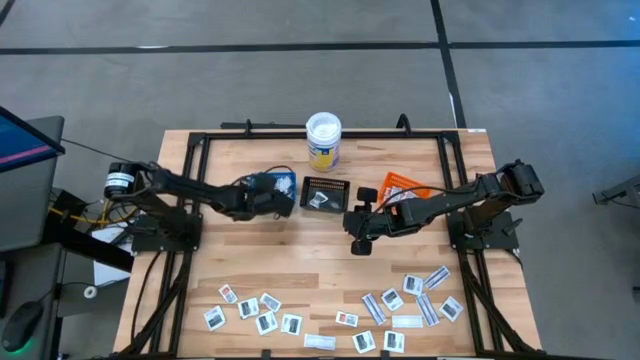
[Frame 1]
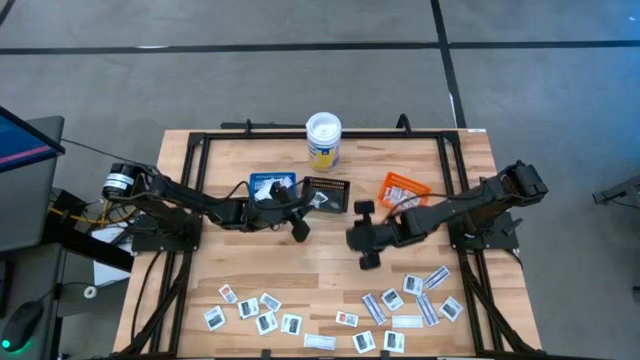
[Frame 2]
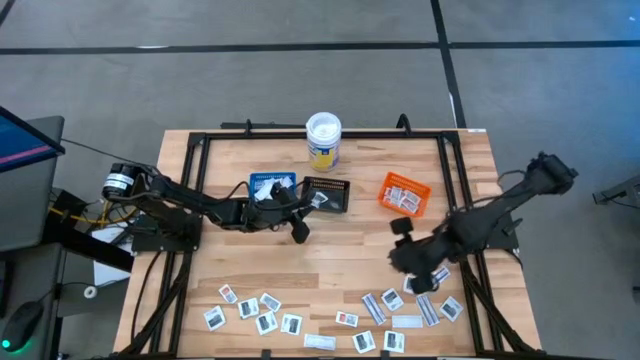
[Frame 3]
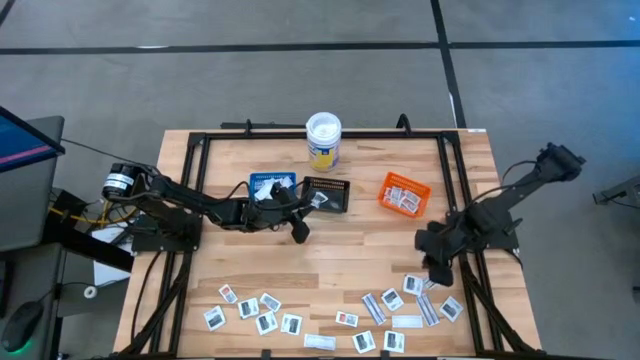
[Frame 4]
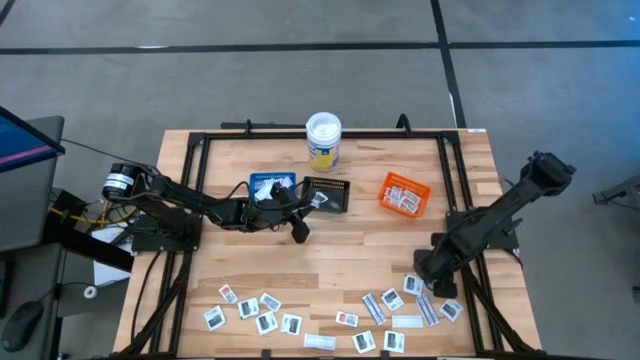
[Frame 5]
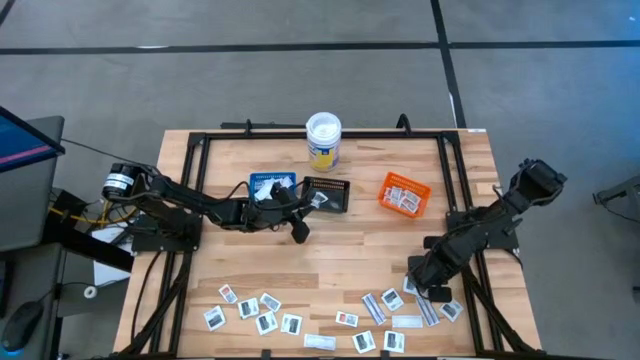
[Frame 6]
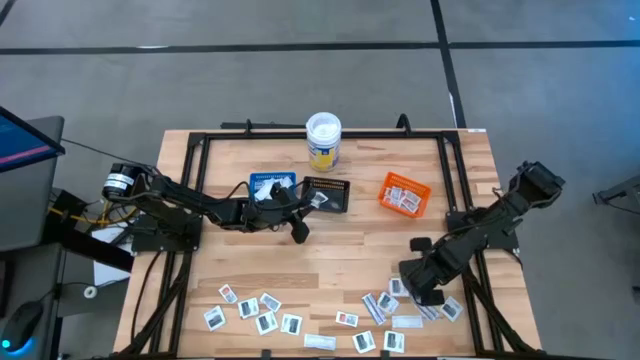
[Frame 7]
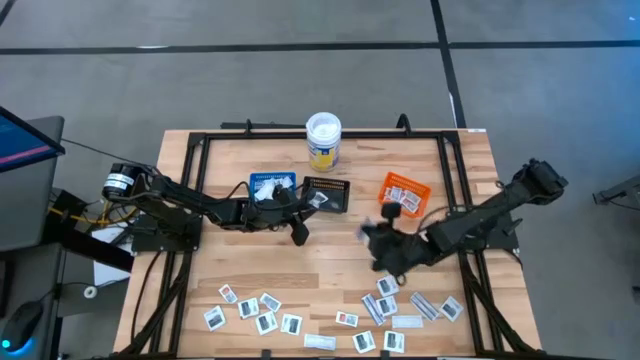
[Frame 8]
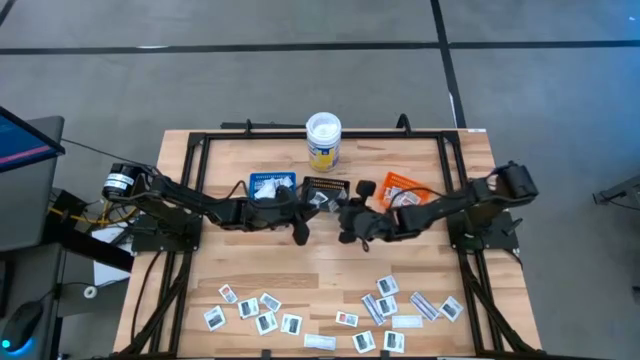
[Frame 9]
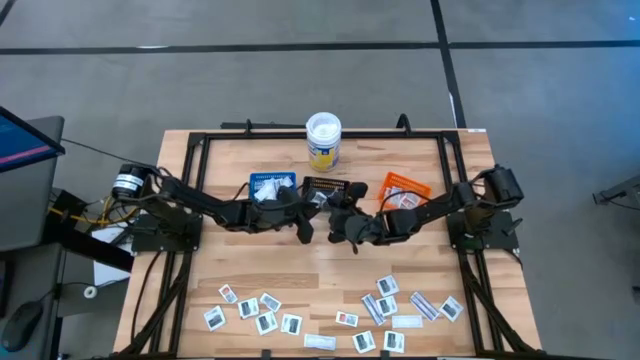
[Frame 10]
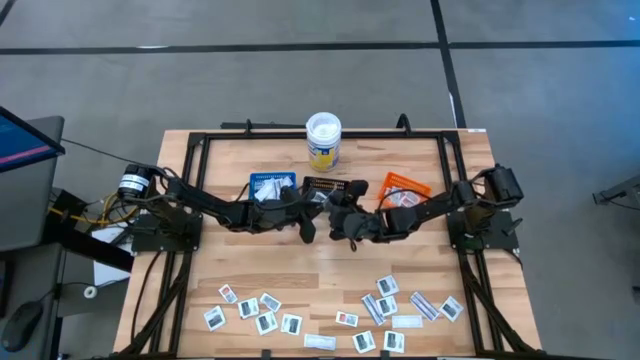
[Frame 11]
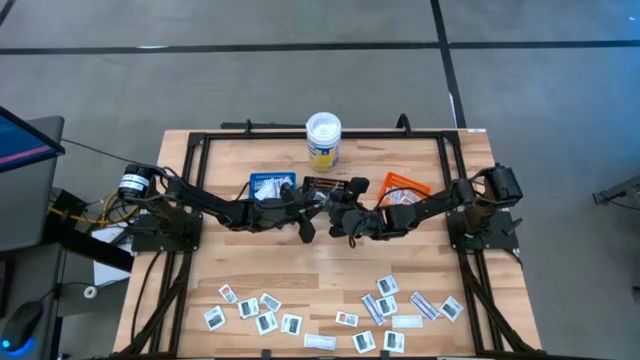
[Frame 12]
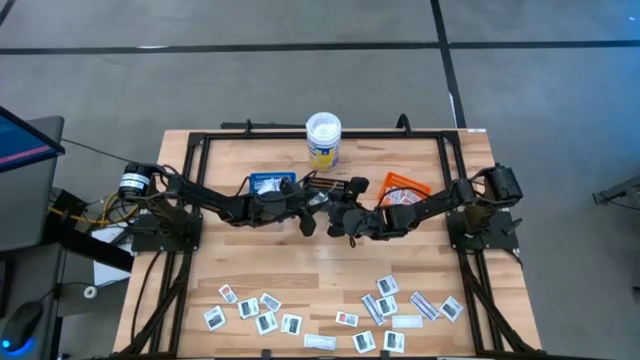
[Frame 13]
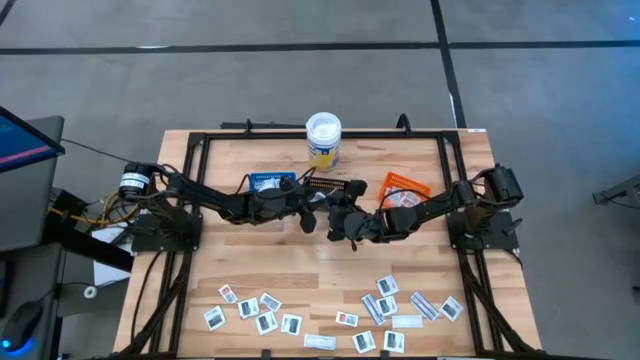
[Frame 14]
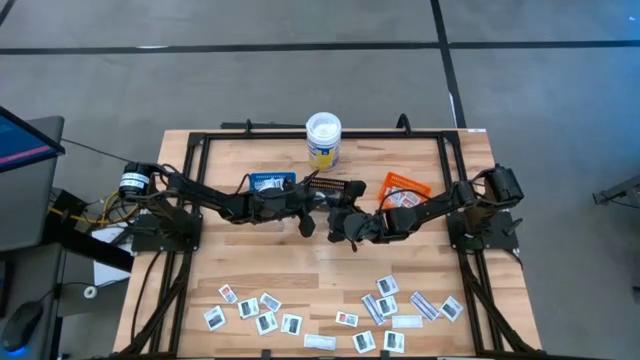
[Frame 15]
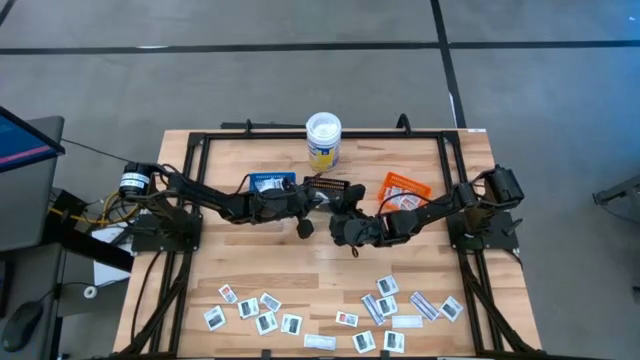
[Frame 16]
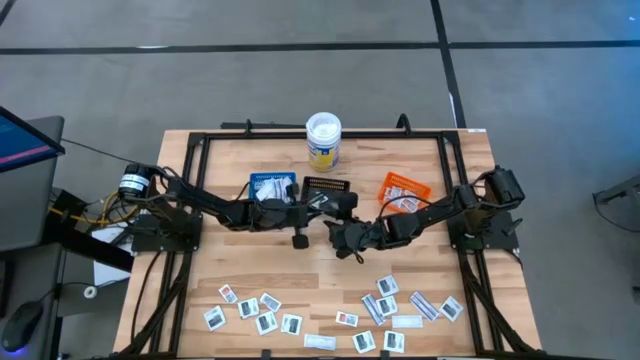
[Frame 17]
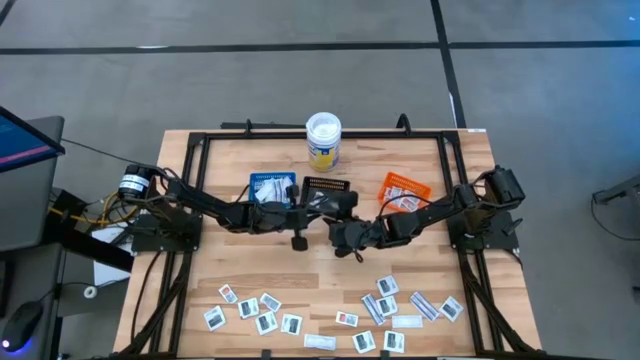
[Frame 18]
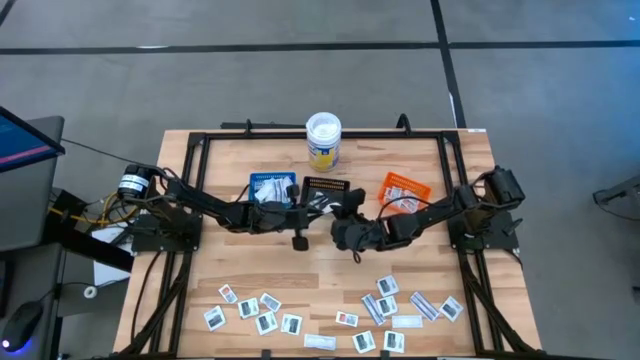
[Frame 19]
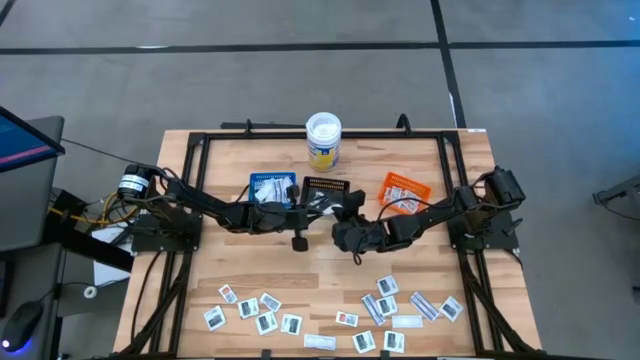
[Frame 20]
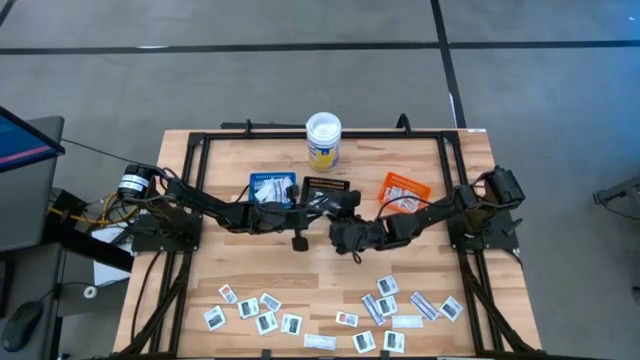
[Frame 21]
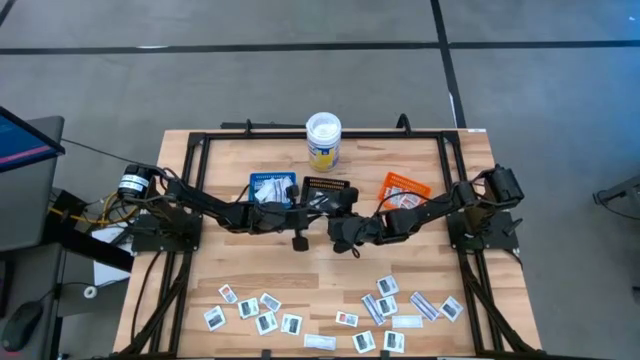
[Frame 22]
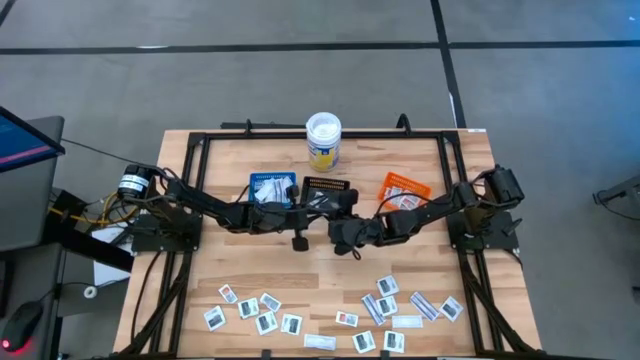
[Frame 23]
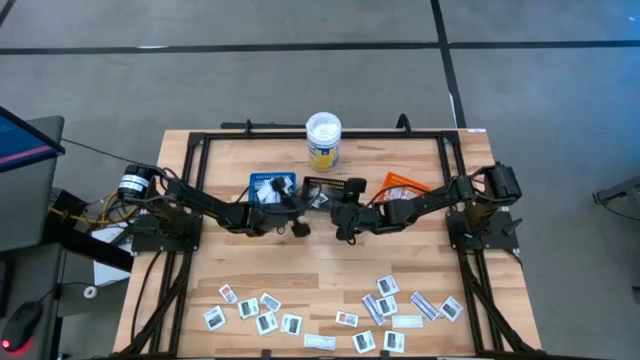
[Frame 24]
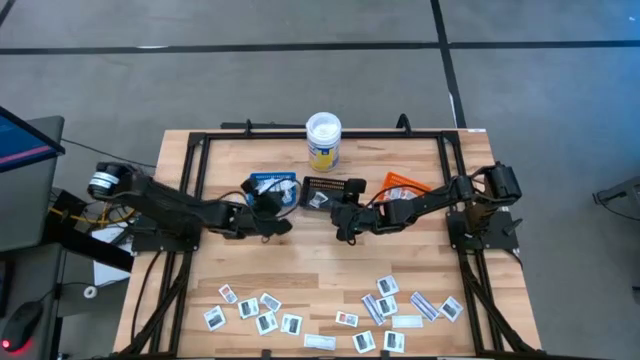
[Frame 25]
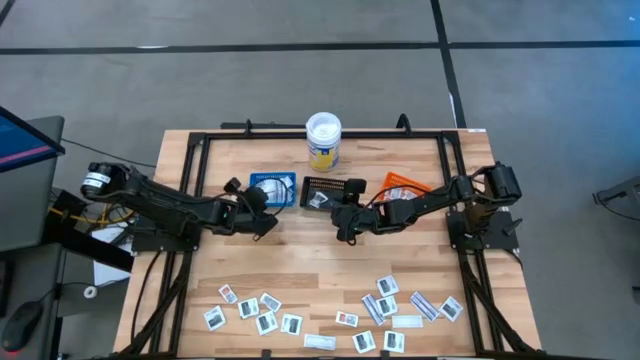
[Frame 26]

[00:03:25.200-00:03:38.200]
Task: Pick & Place First Aid Supplies
Put the blue bandage into the blue bin

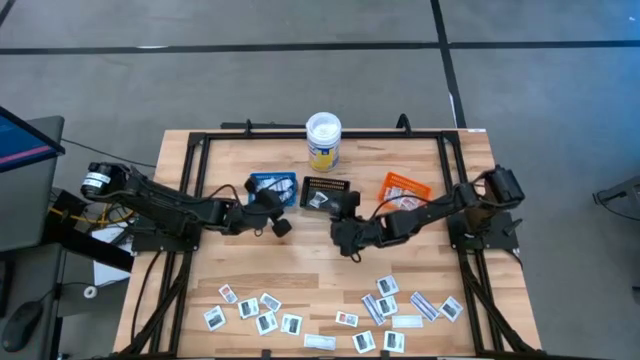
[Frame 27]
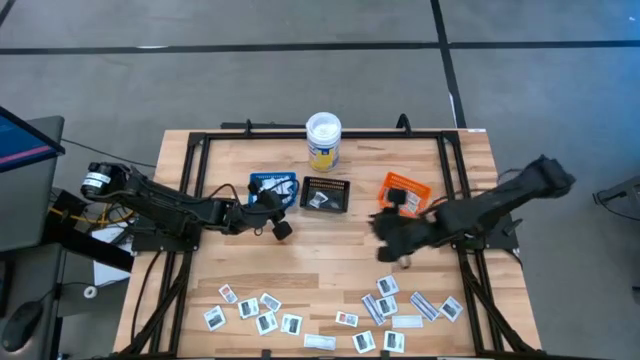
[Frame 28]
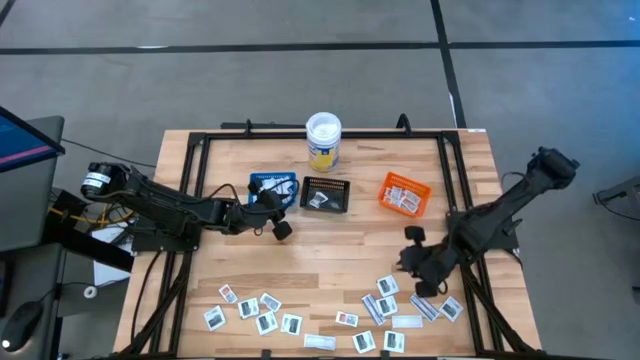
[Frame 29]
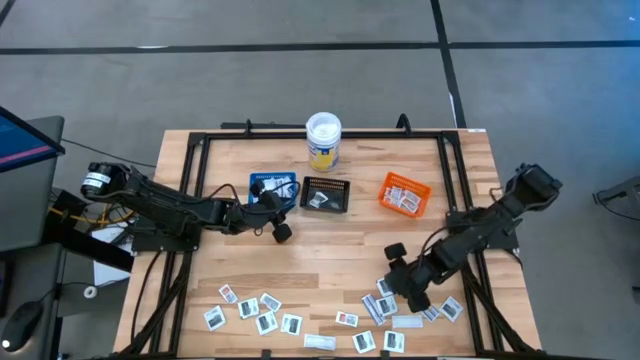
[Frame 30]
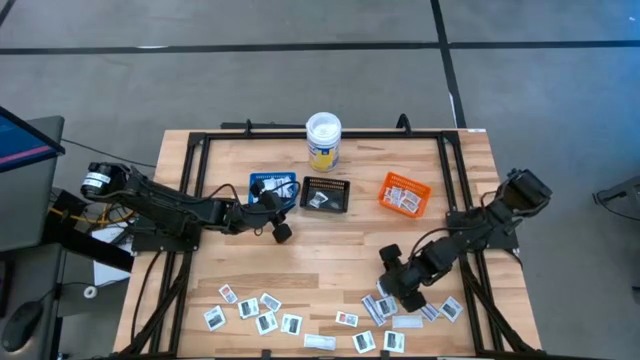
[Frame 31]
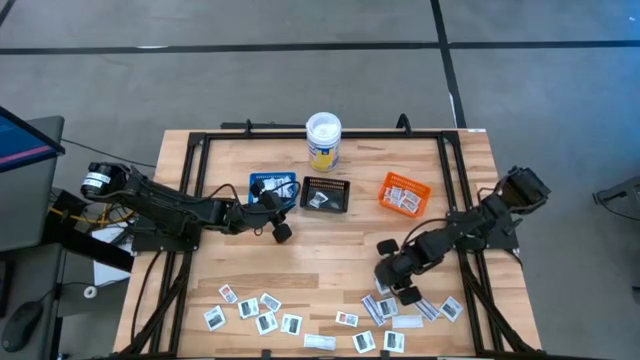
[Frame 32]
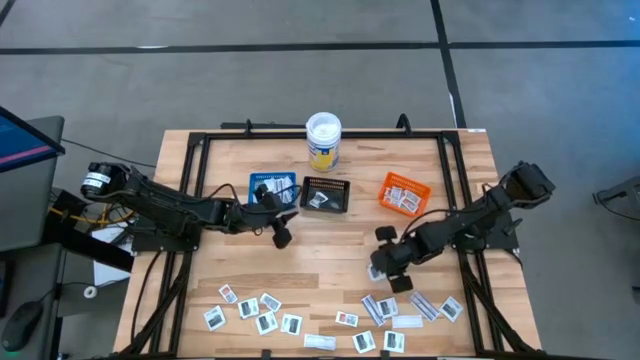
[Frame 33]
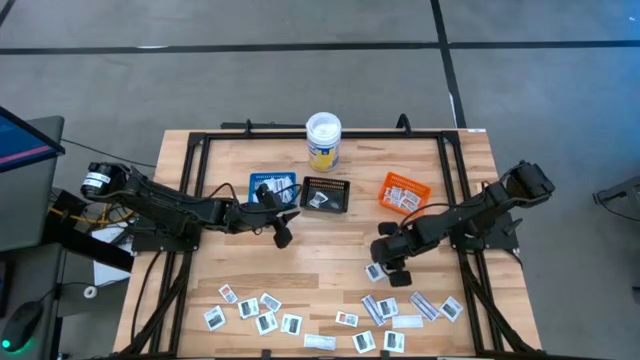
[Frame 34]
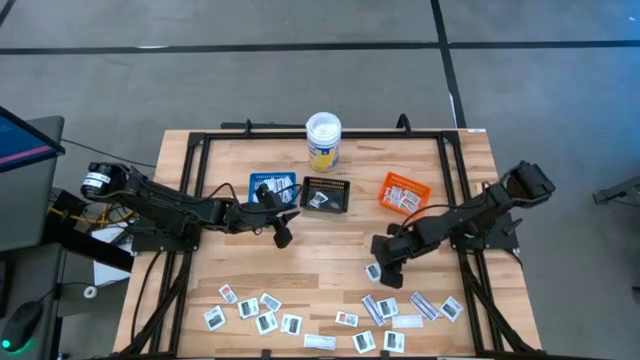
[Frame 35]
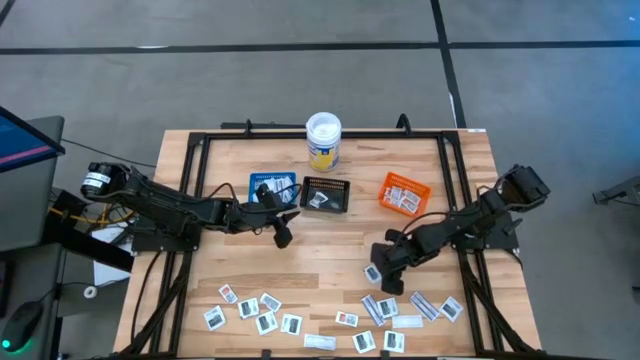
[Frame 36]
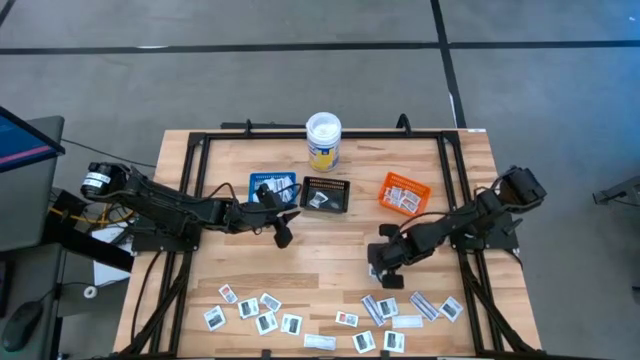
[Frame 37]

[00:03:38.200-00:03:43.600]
Put the black towelette pack into the black bin

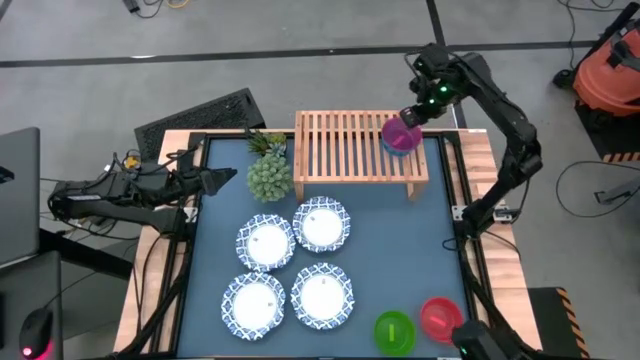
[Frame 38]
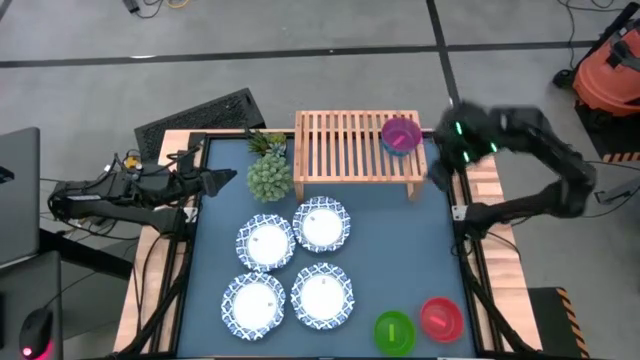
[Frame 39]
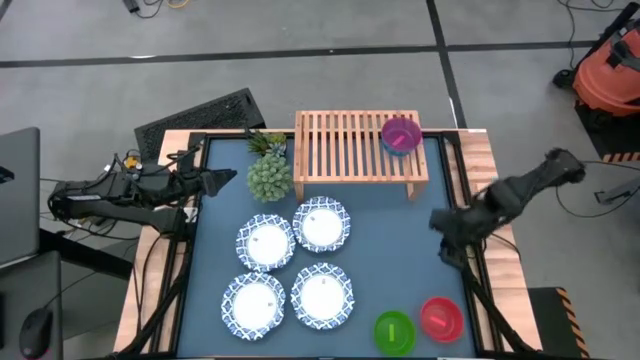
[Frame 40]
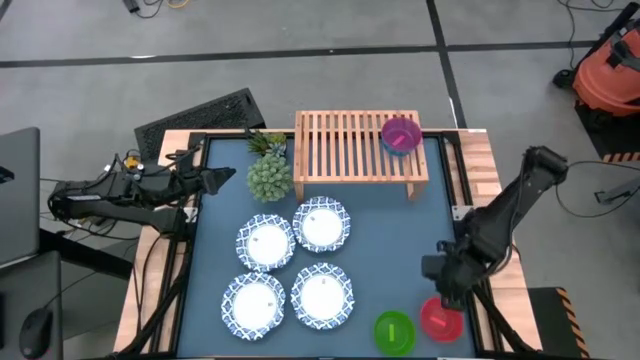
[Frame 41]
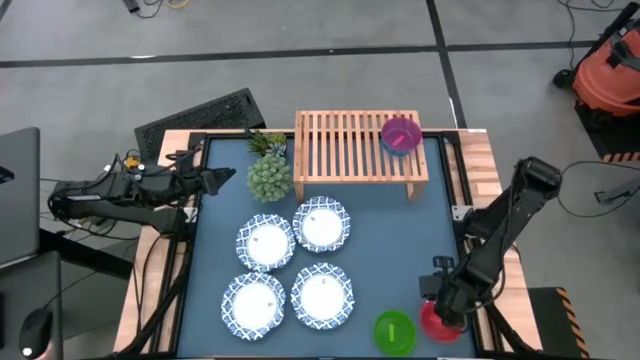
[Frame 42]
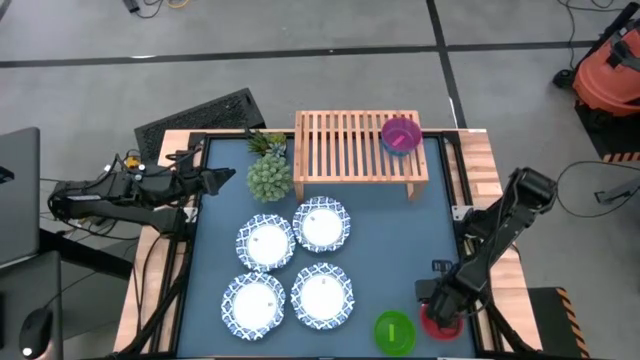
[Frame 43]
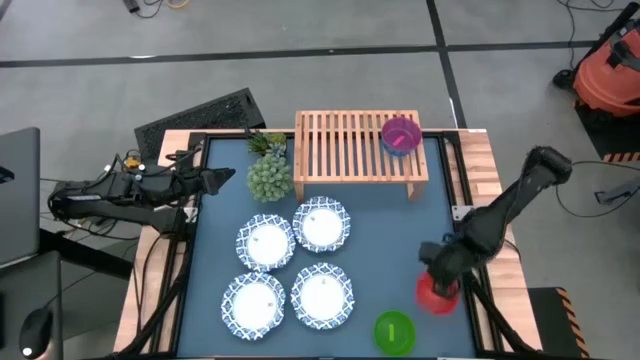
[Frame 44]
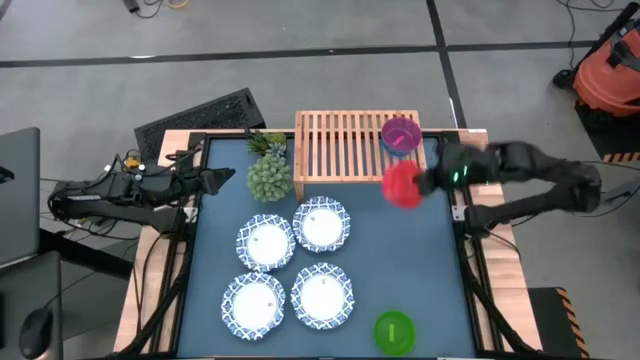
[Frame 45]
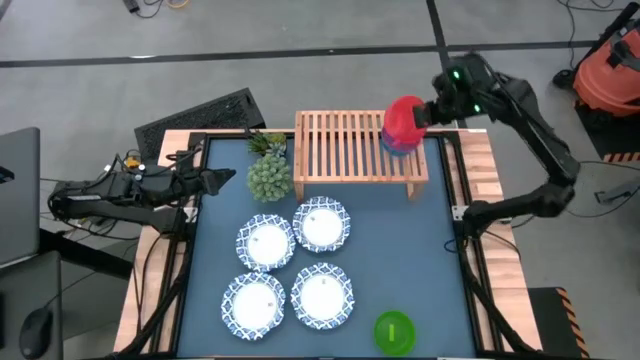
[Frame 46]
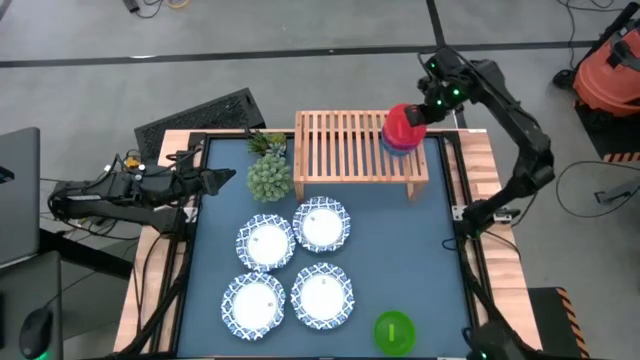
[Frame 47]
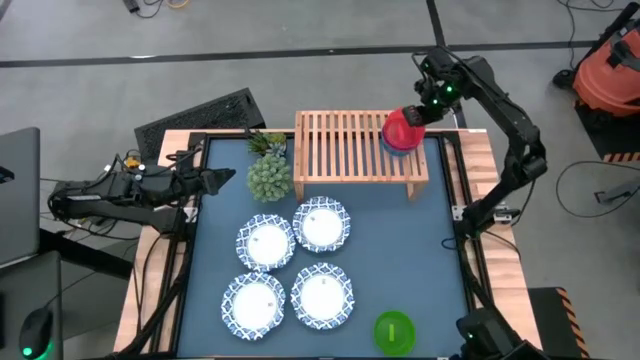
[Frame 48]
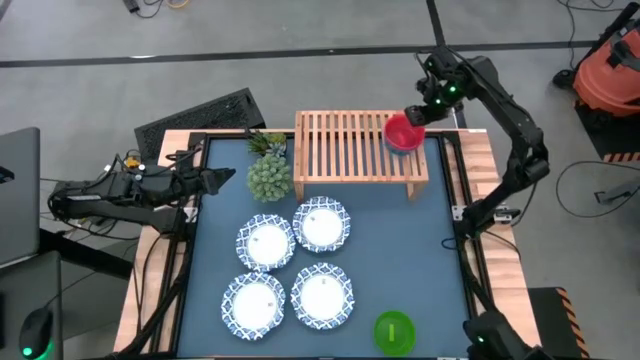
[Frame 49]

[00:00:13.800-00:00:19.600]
Task: Place and stack bowls onto a shelf
Stack the orange bowl on top of the red bowl on the shelf
